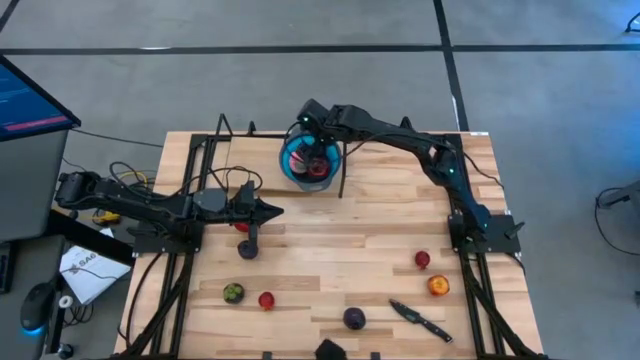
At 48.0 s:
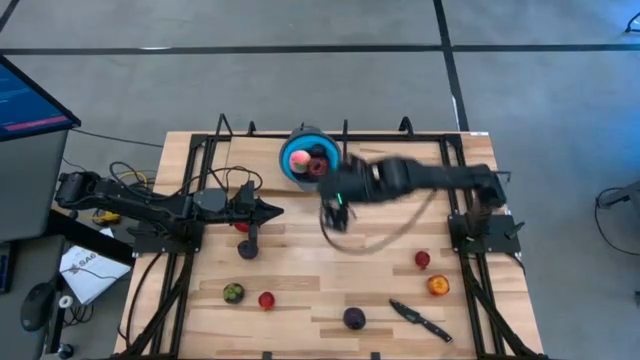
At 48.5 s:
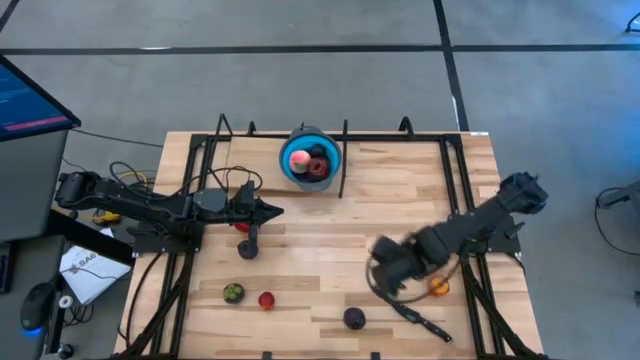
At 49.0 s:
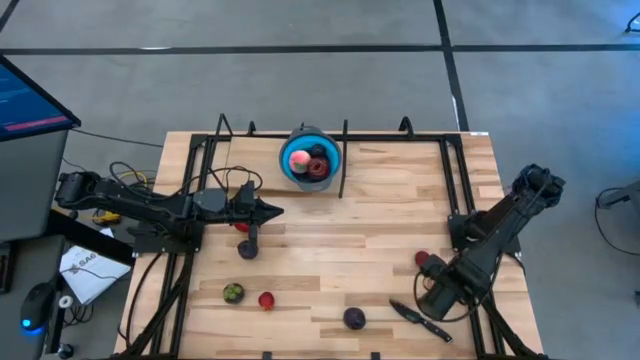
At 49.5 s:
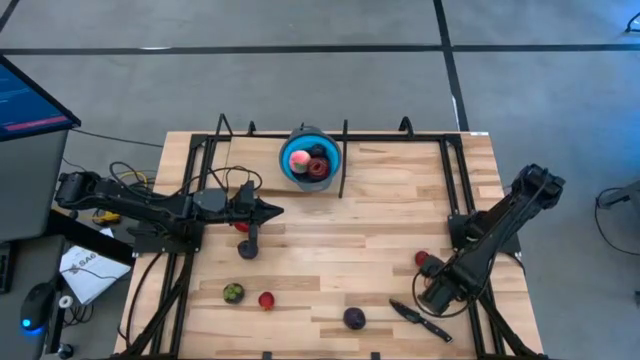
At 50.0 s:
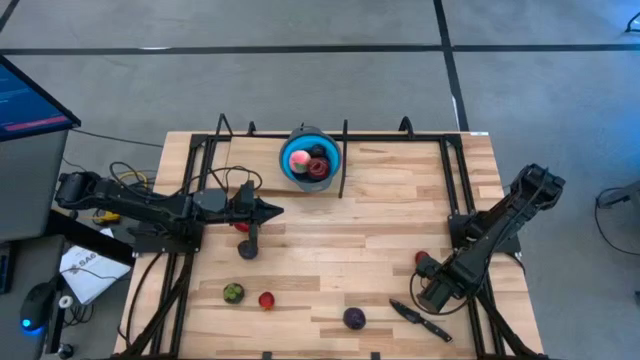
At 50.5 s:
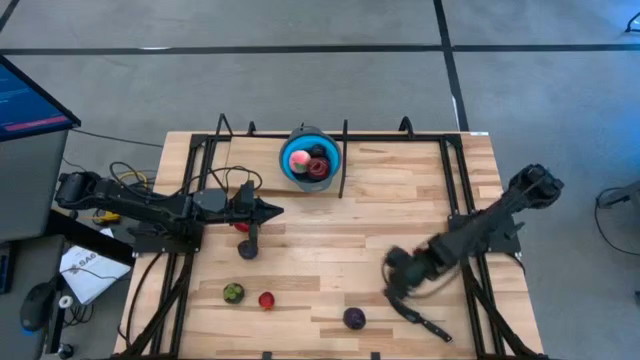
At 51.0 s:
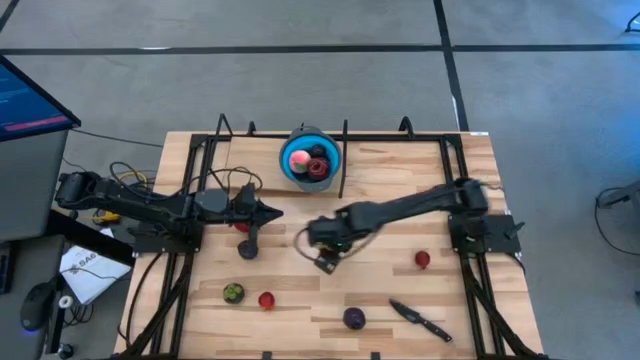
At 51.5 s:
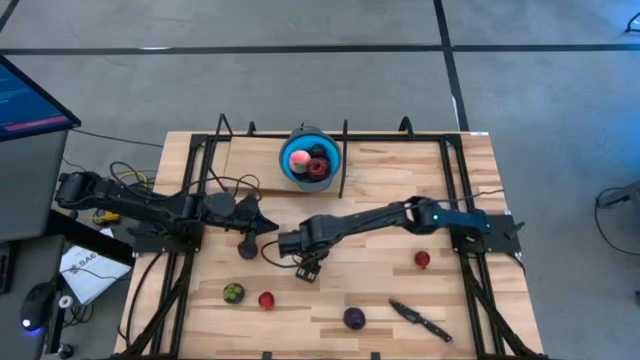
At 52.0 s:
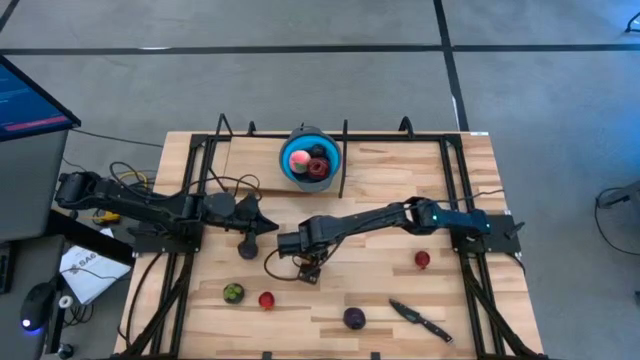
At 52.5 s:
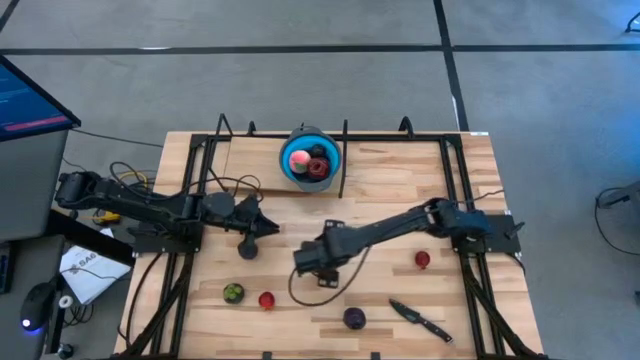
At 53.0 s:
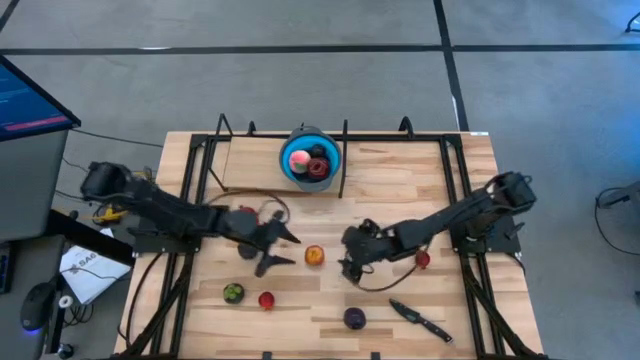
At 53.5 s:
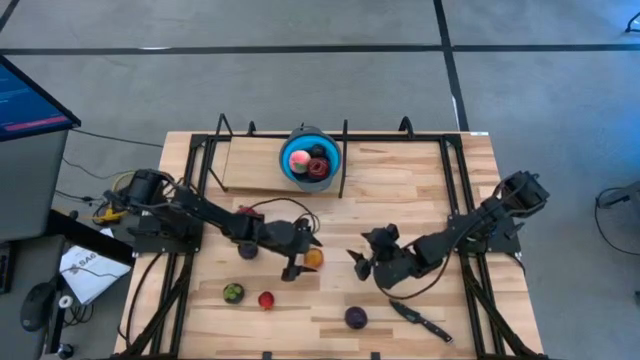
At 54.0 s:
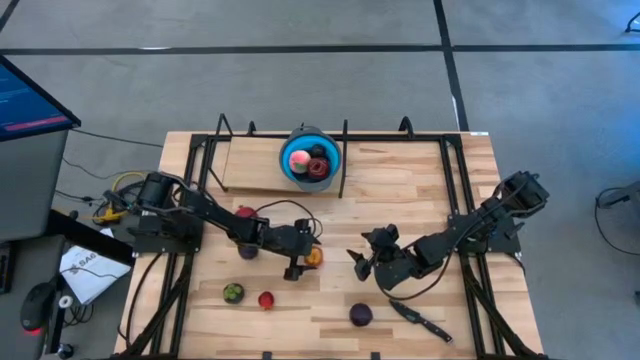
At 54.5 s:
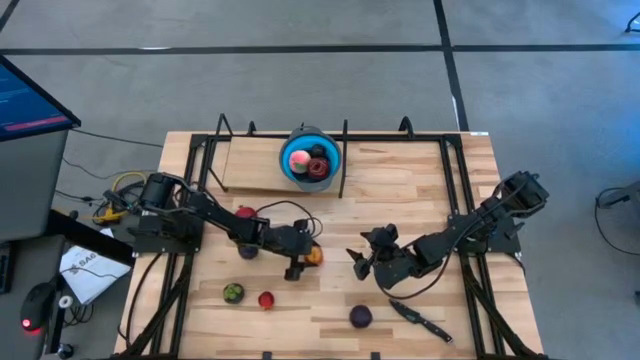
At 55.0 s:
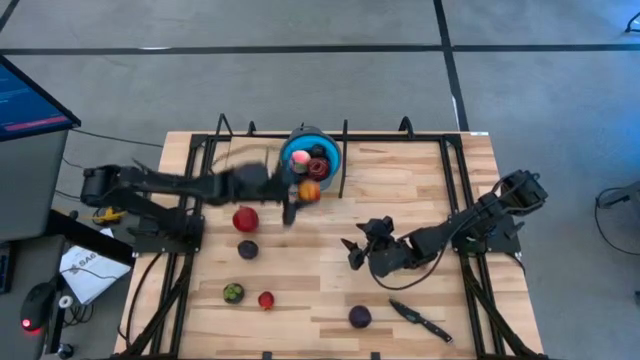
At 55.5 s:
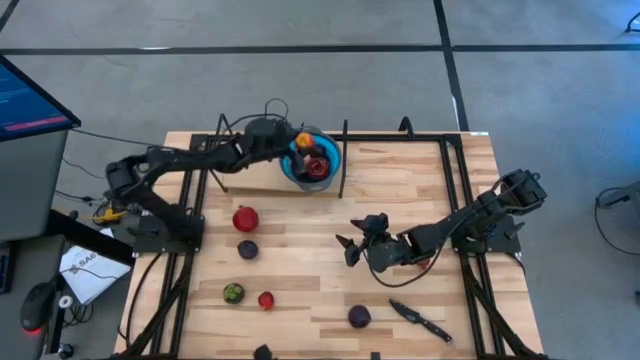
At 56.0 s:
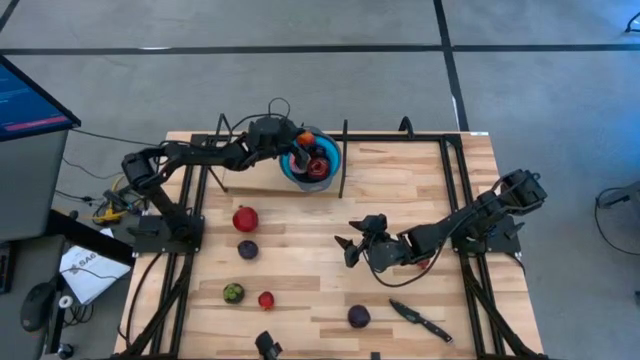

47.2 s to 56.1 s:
Task: Pick & Place Fruit
Put the red yellow apple into the blue strainer bowl on the shelf

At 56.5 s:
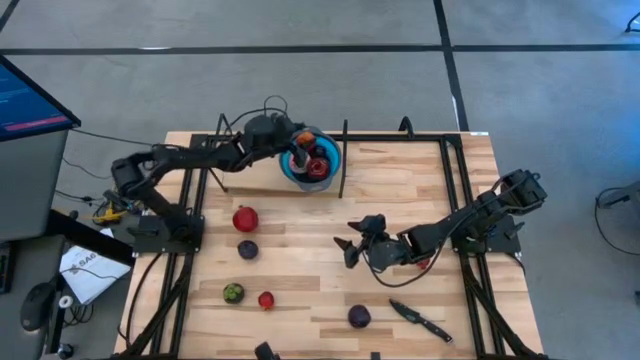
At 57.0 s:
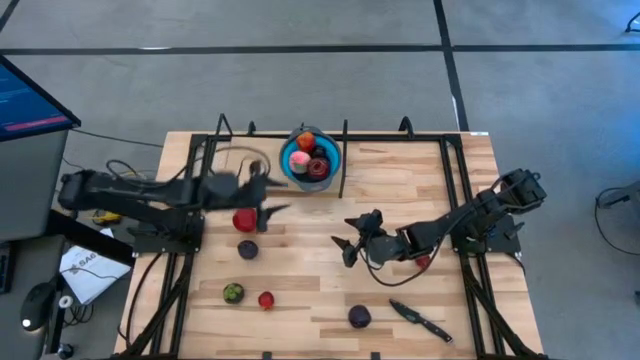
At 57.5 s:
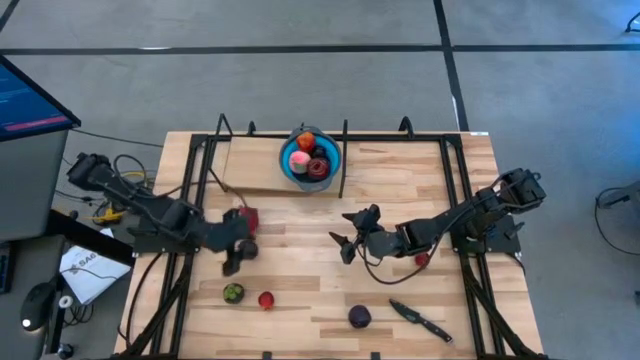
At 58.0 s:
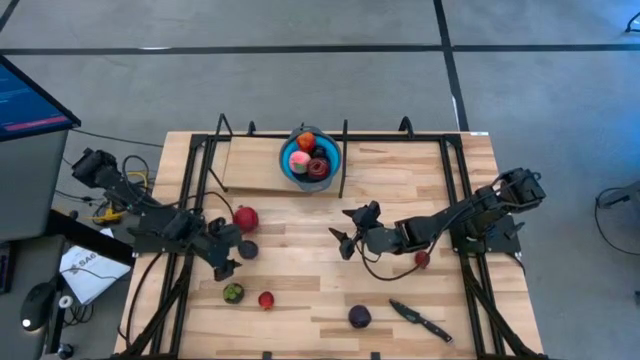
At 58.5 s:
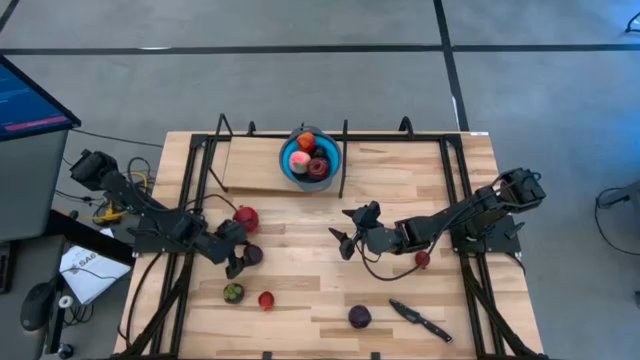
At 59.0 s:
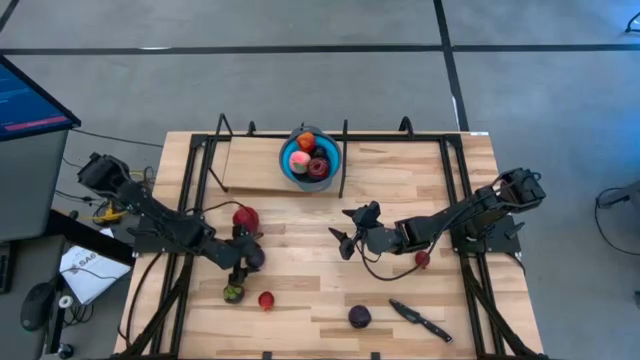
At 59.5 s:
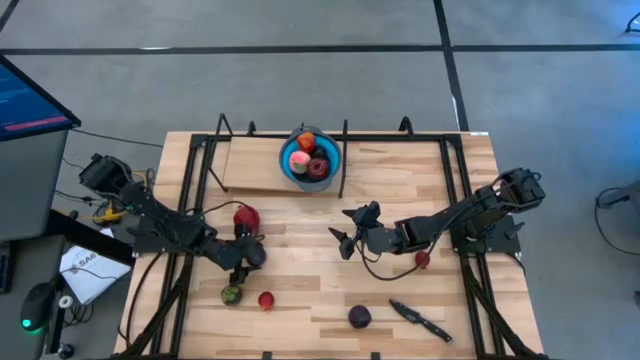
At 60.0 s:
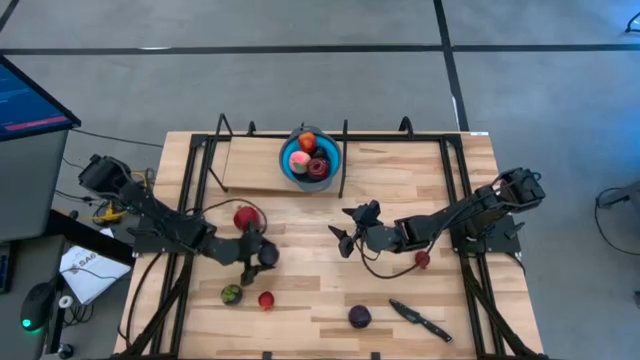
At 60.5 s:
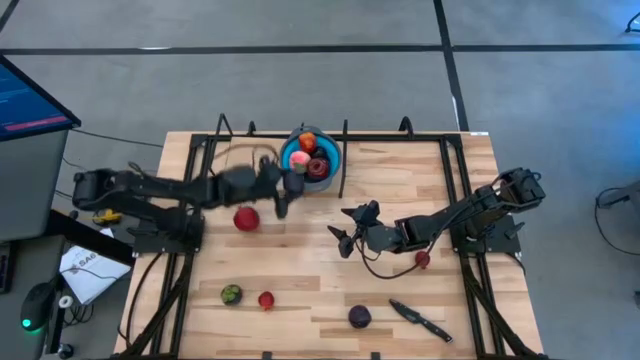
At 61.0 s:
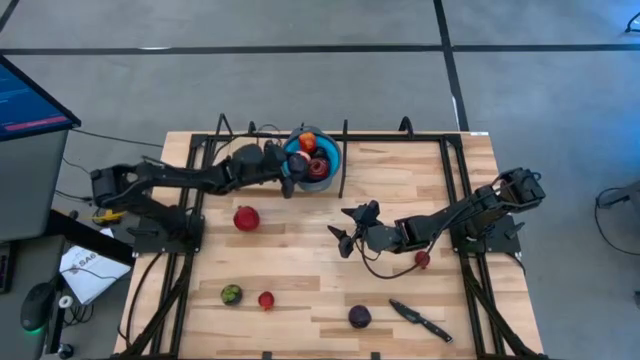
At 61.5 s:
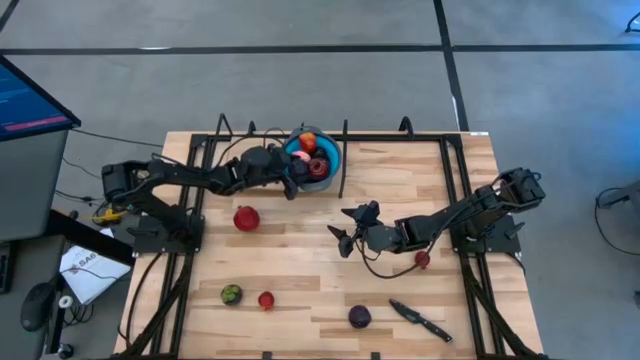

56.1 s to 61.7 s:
Put the top left dark purple mangosteen into the blue strainer bowl on the shelf

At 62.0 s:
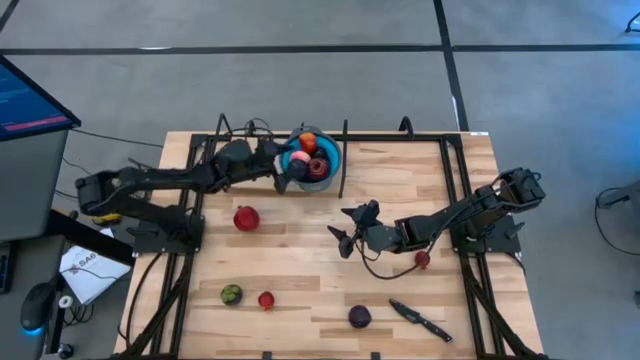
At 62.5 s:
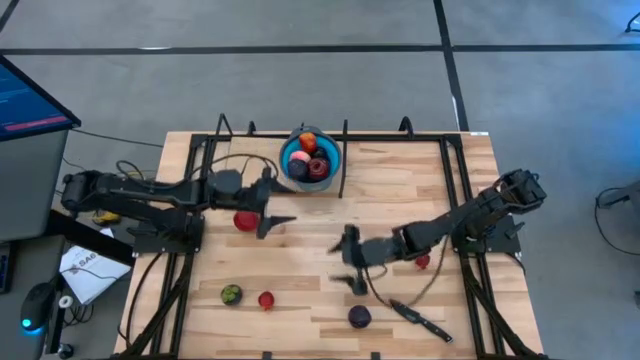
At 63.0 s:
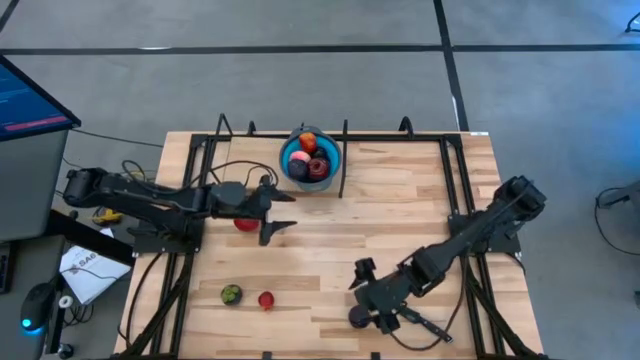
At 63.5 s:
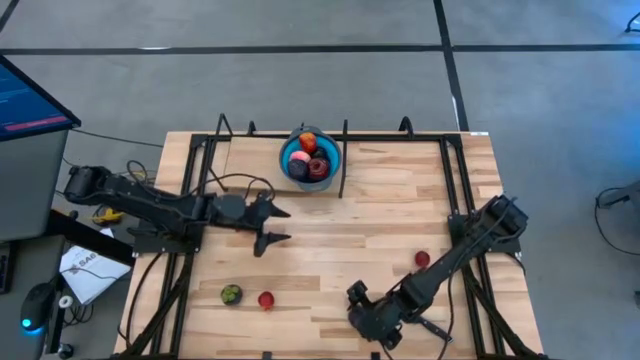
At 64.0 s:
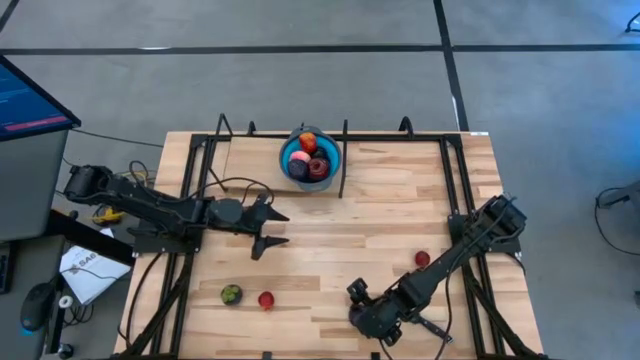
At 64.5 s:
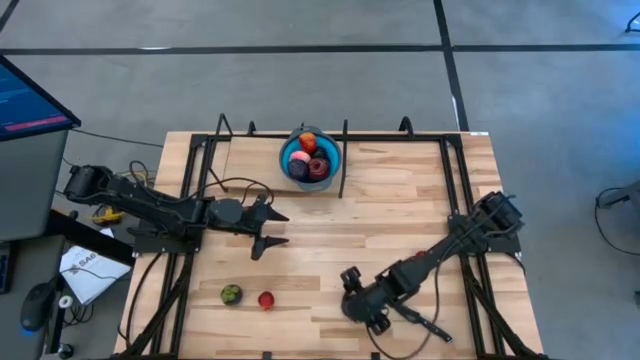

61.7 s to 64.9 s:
Put the right dark purple mangosteen into the blue strainer bowl on the shelf

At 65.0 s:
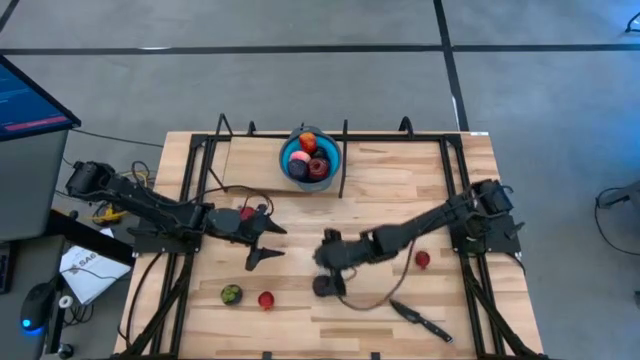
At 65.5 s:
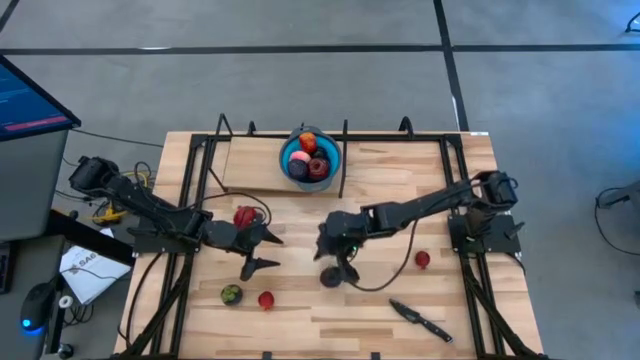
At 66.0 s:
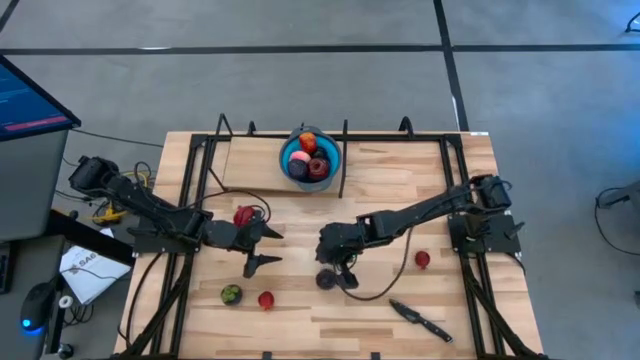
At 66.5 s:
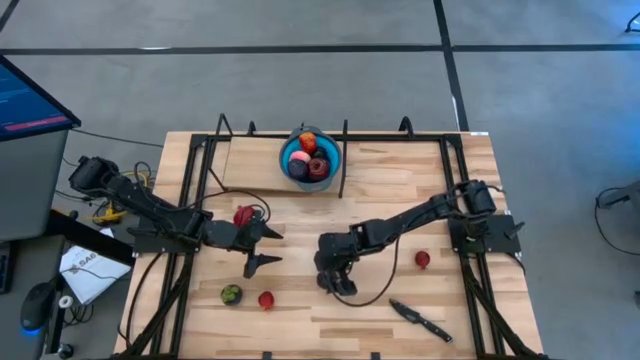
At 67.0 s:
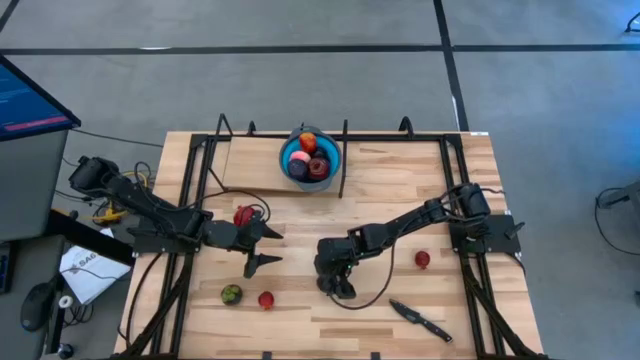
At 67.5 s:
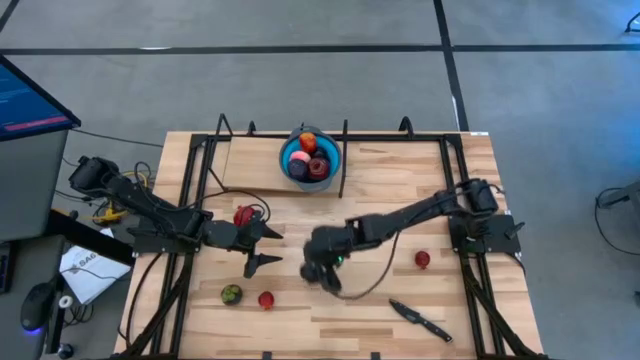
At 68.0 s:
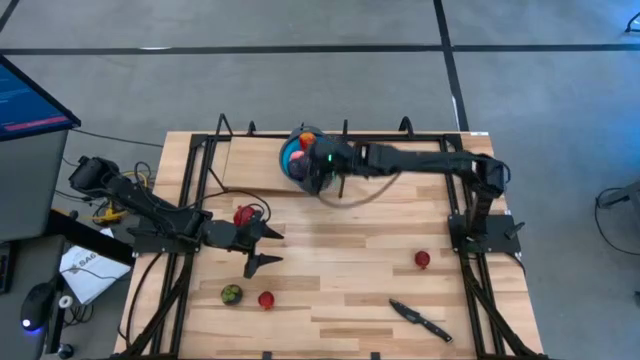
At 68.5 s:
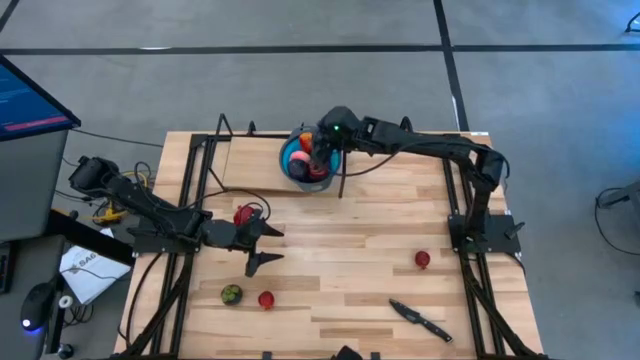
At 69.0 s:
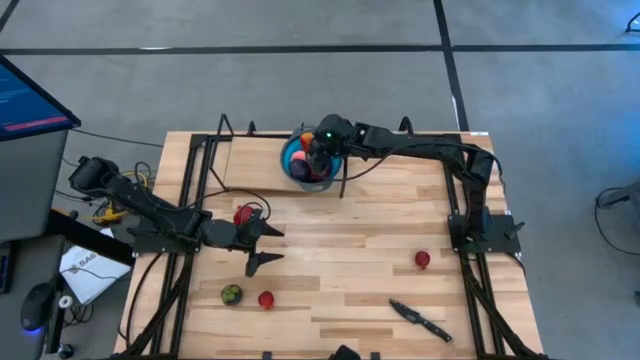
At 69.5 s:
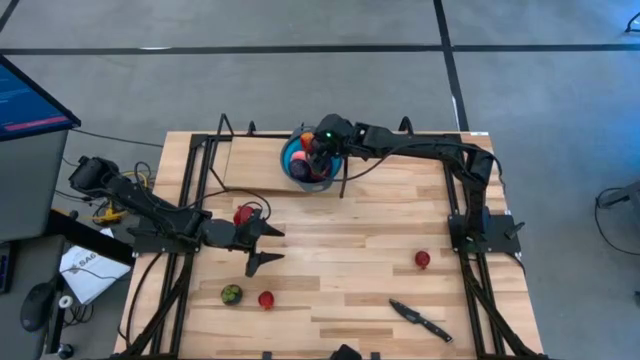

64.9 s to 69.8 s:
Put the right dark purple mangosteen into the blue strainer bowl on the shelf
